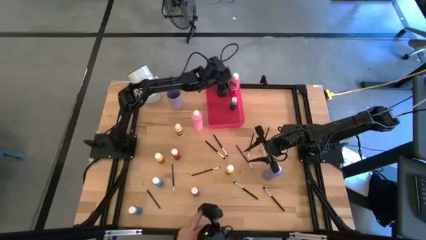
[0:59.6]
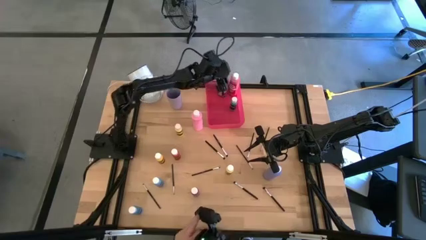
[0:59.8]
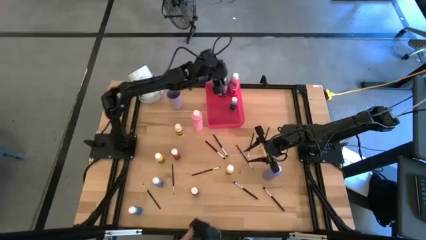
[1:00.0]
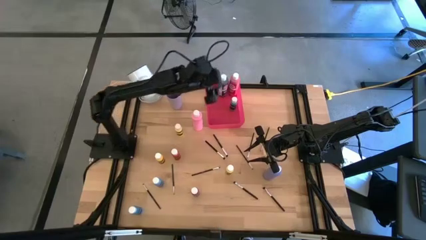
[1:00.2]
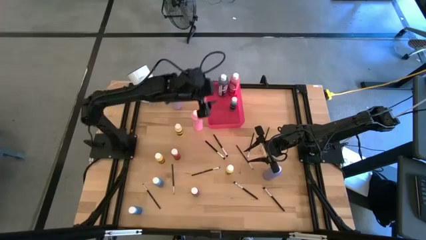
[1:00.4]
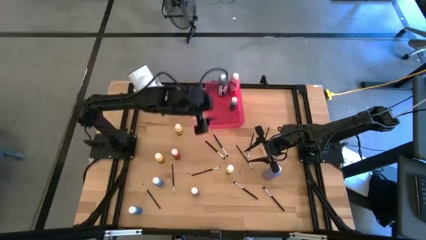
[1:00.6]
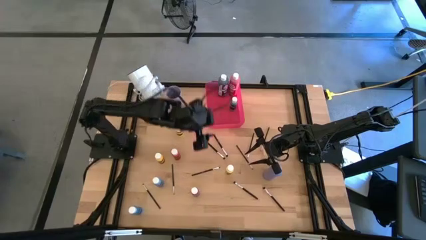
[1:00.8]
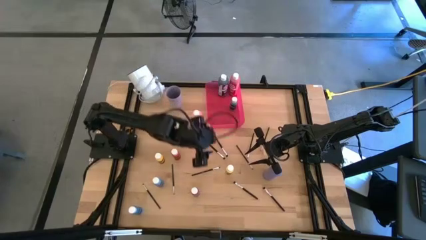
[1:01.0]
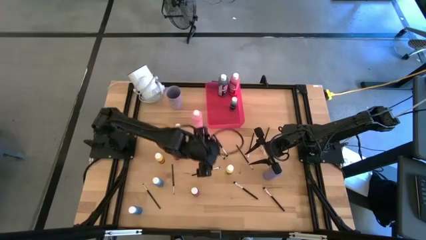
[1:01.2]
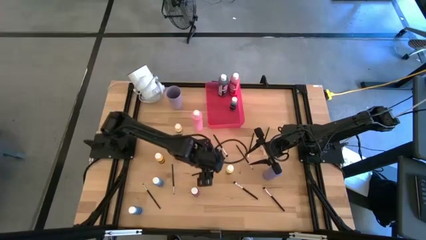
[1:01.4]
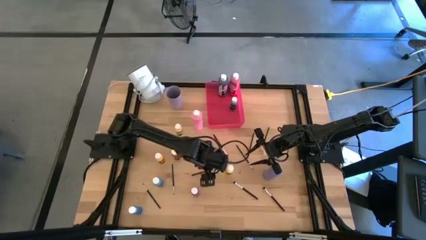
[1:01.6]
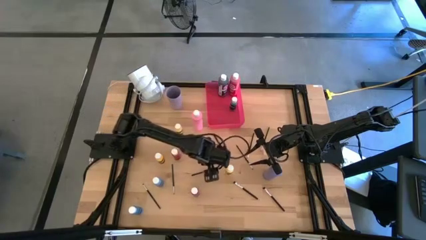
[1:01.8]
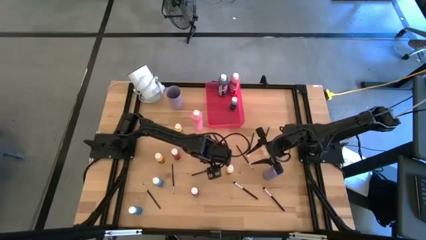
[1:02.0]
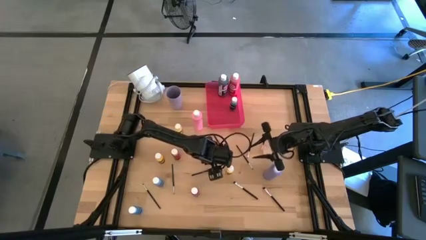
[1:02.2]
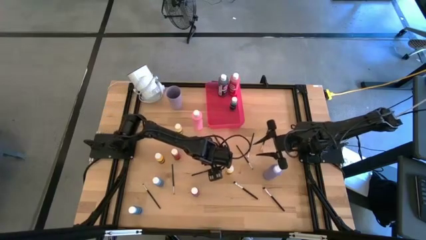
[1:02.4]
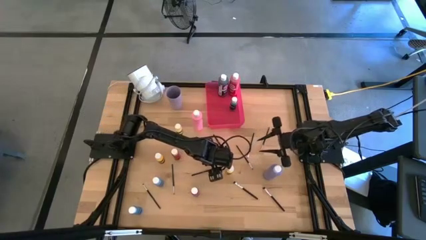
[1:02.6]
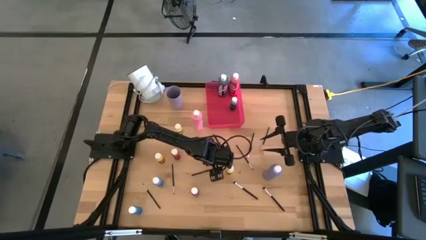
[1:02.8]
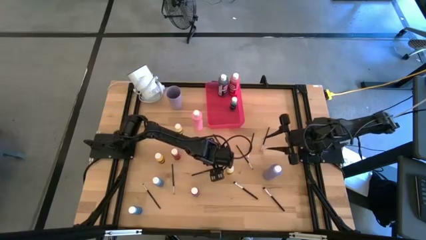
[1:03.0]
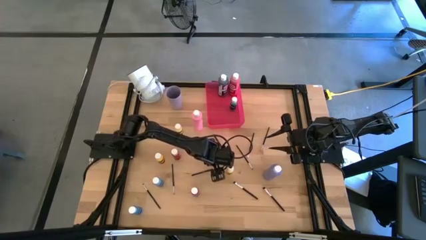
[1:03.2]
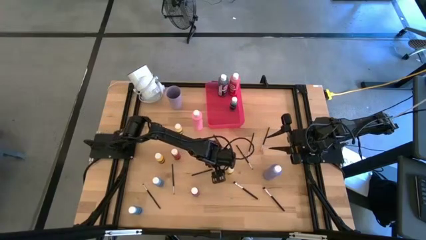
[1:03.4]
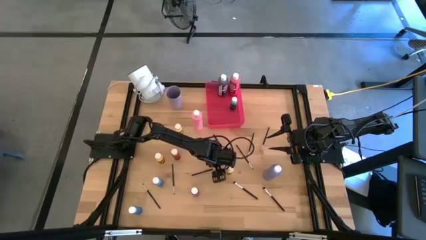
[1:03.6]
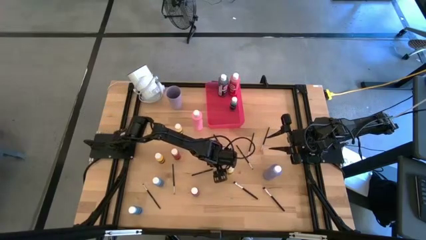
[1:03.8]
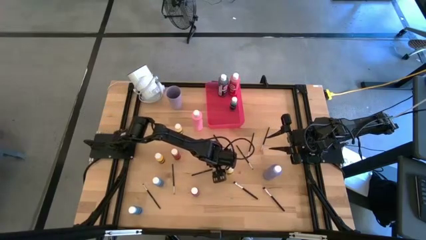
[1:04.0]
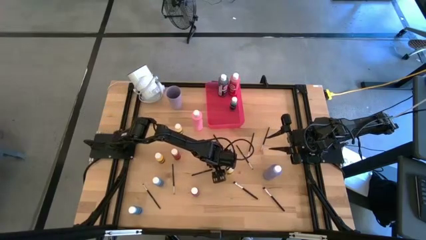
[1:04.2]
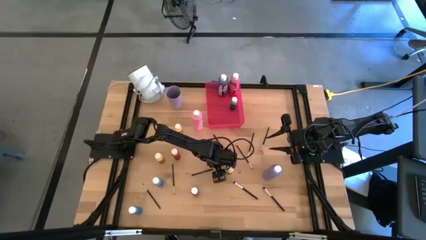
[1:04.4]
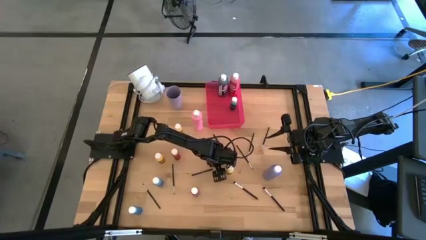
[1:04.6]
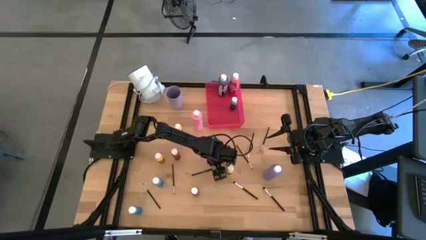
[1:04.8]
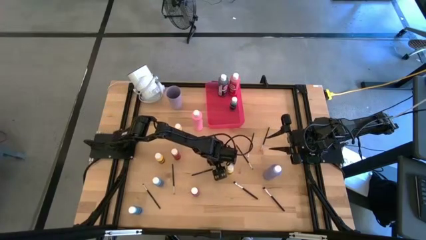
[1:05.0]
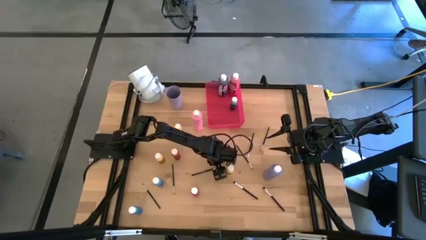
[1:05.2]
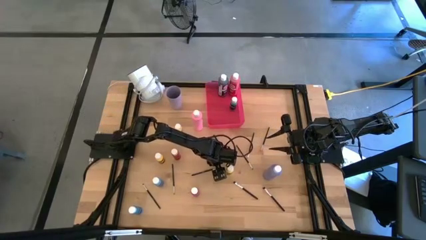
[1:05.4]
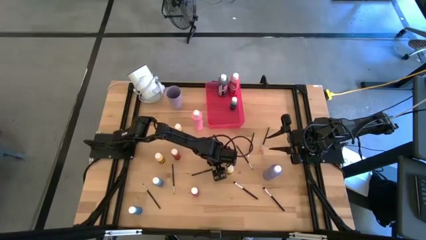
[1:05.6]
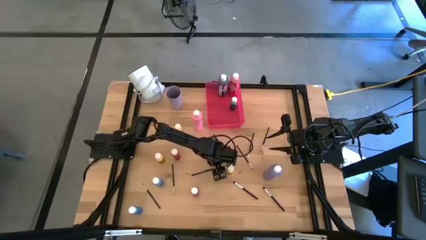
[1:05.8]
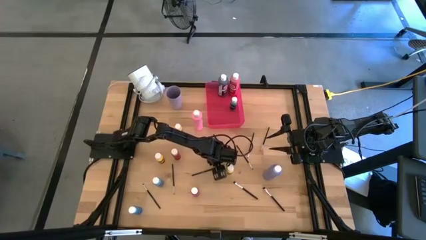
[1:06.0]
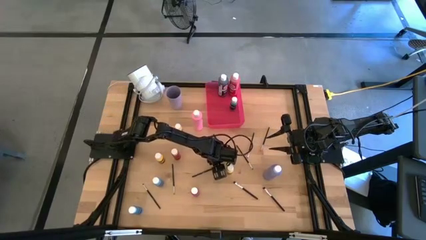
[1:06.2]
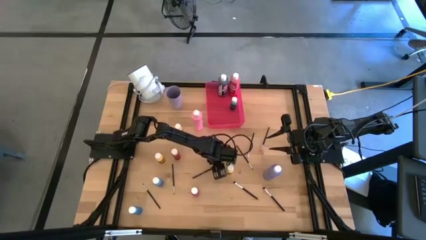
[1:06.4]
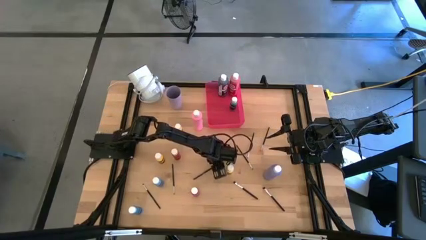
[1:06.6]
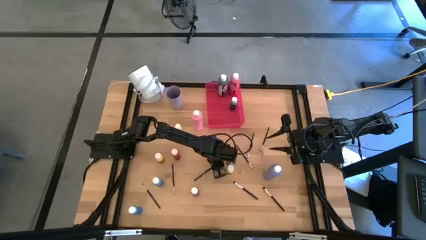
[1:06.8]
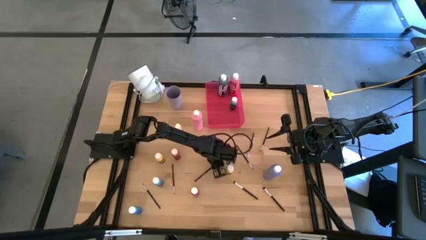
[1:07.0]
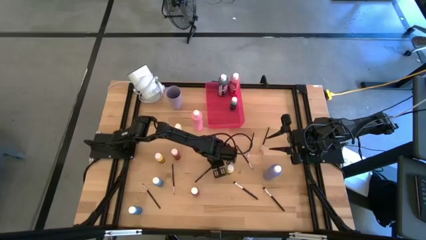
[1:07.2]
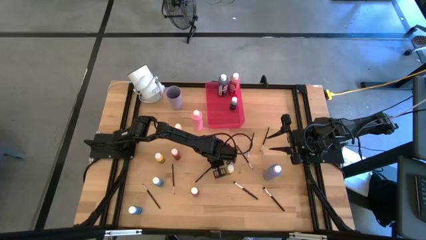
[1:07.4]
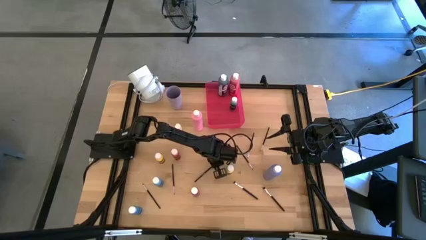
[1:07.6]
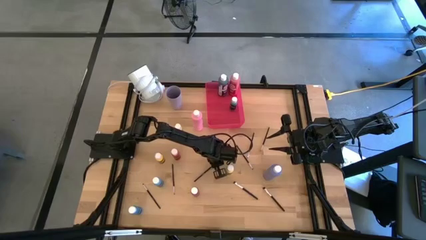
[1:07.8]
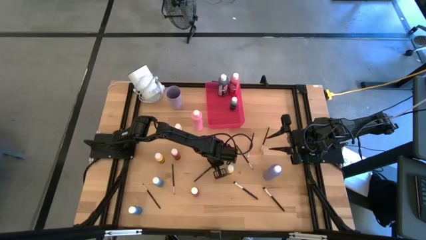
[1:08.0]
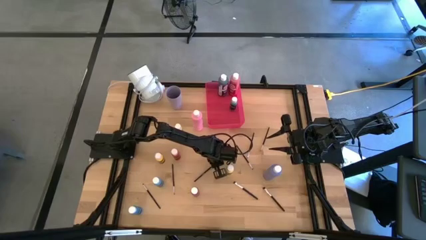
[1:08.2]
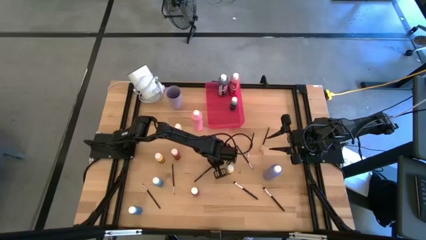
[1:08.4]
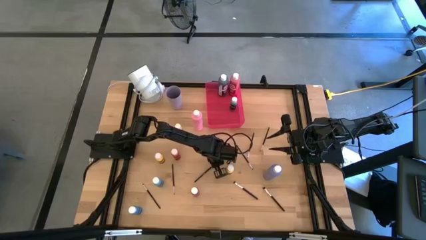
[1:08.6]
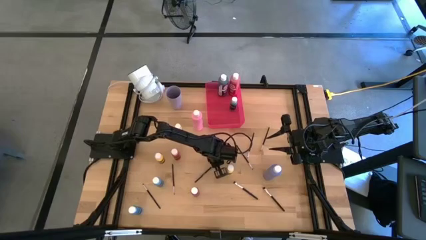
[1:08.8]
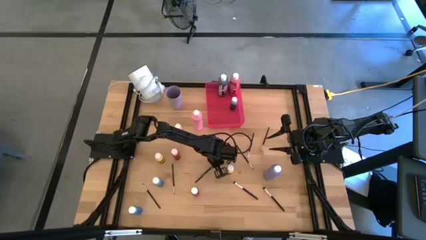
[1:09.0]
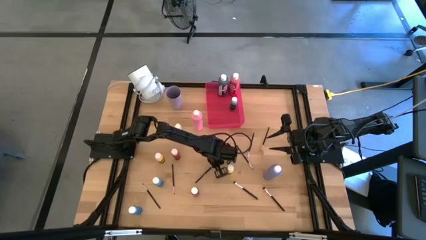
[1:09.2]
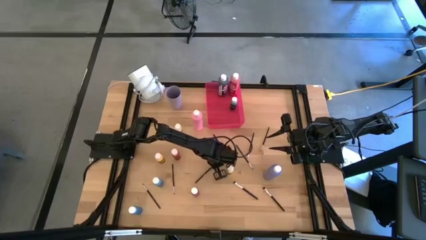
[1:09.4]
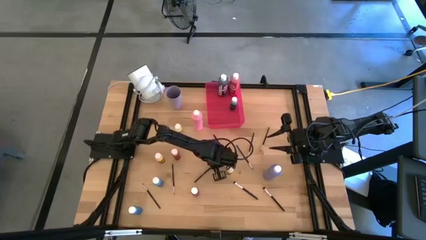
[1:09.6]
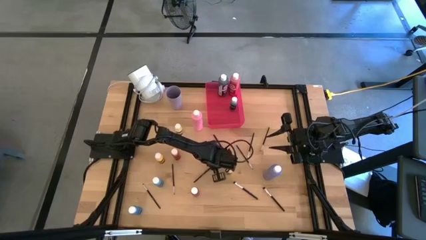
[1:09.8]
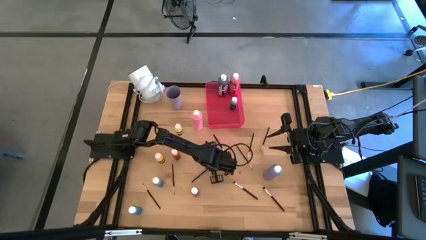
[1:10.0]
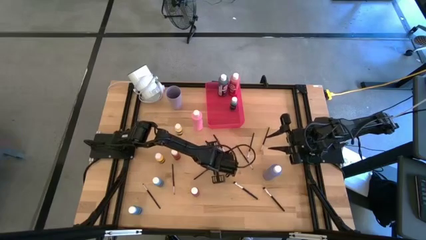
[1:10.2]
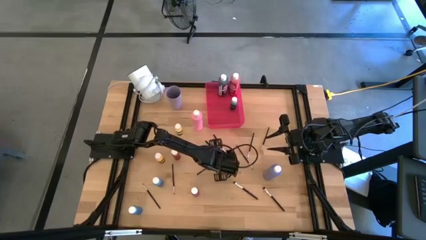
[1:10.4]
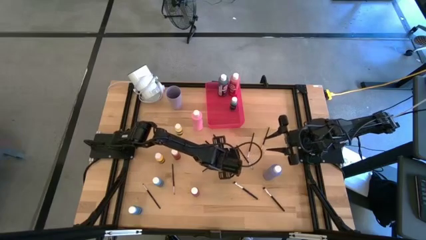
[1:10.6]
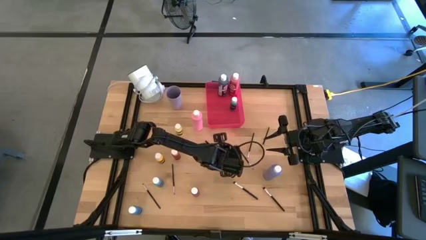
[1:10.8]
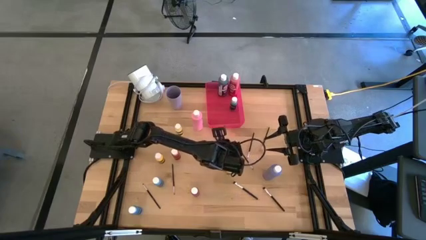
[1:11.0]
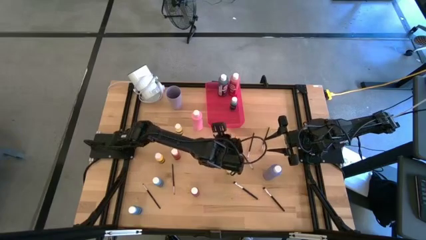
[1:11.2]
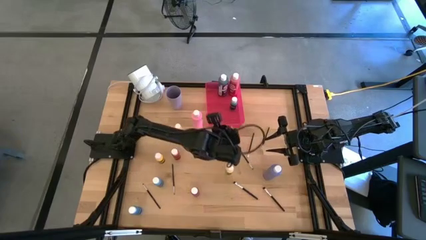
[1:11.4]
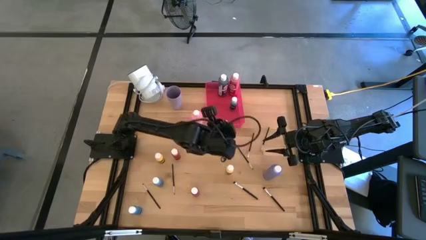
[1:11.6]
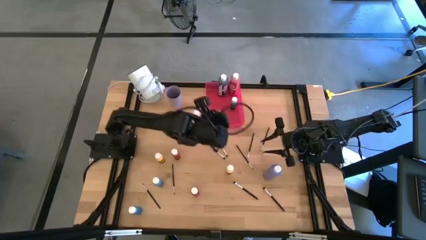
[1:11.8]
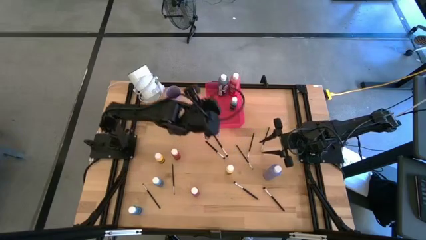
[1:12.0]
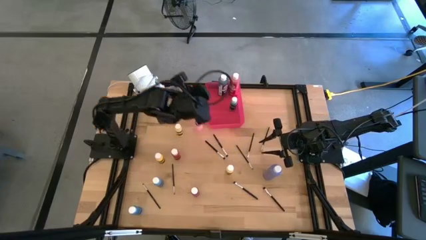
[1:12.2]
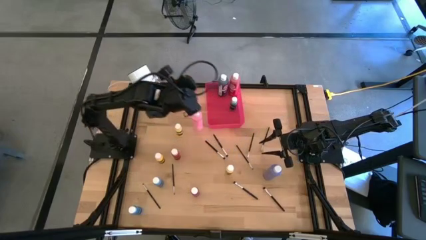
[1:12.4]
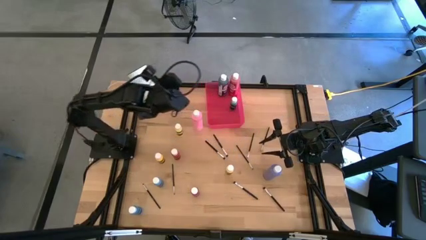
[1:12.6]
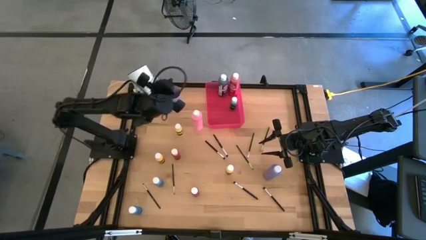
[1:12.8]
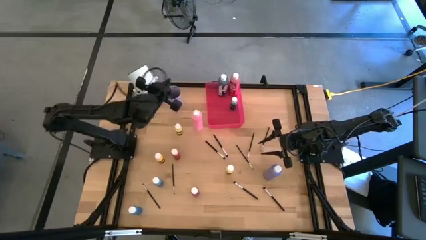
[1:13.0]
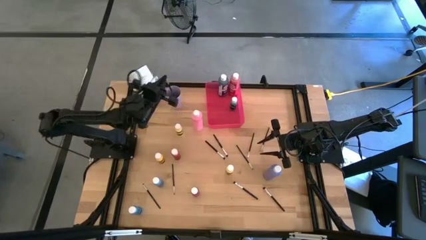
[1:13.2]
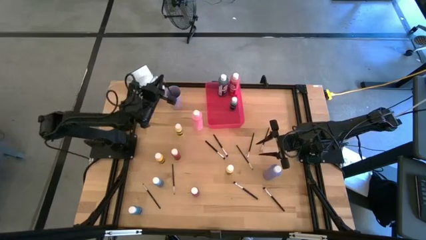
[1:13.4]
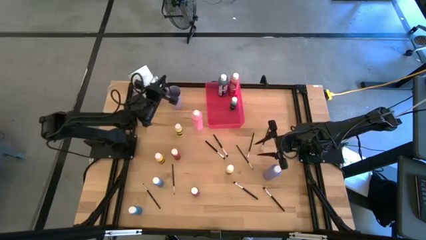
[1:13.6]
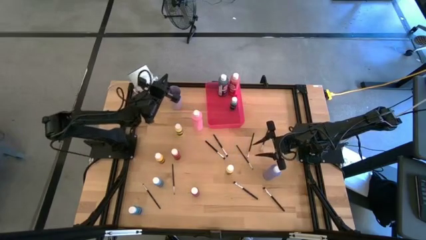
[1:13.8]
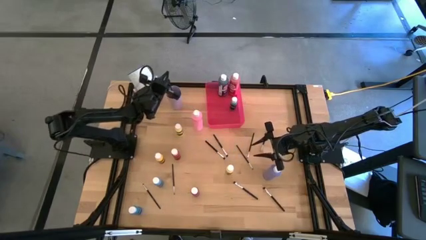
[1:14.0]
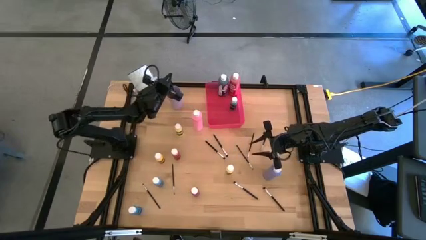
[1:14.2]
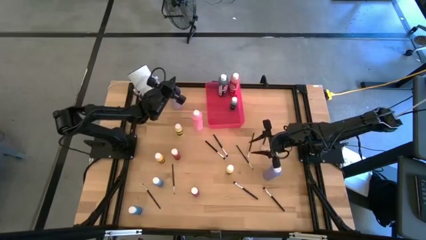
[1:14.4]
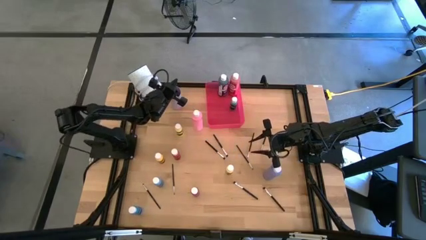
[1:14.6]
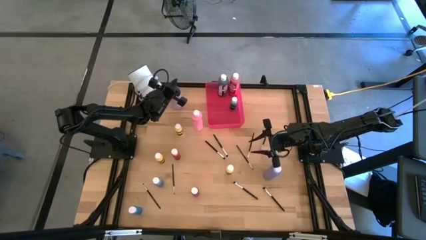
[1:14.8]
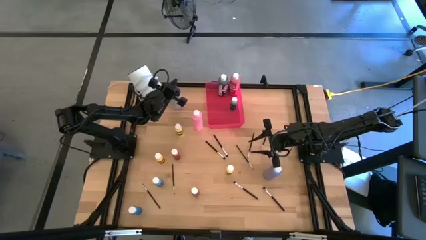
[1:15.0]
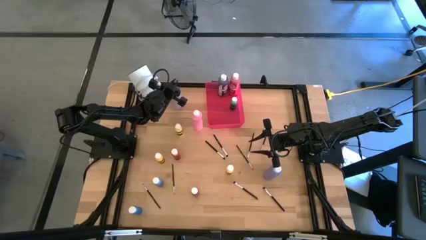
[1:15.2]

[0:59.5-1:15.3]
Task: Pick & Place Paint Supplies
Put the black paint brush into the purple cup
